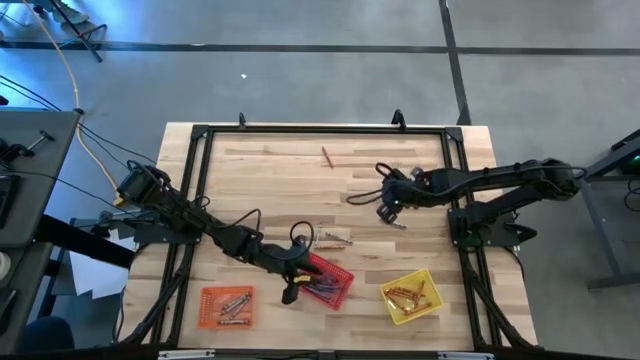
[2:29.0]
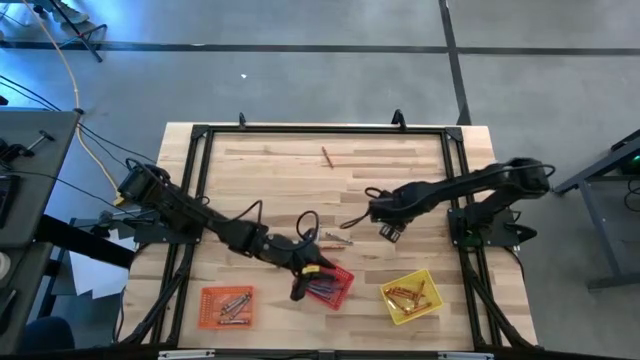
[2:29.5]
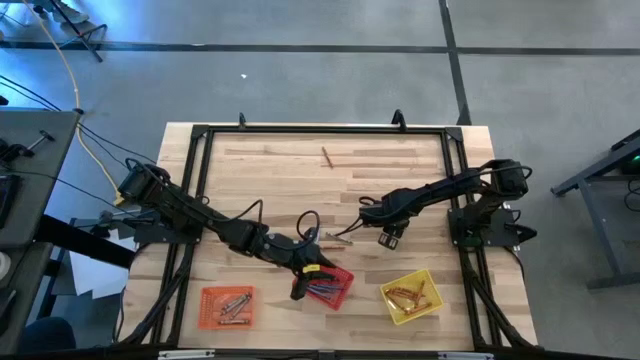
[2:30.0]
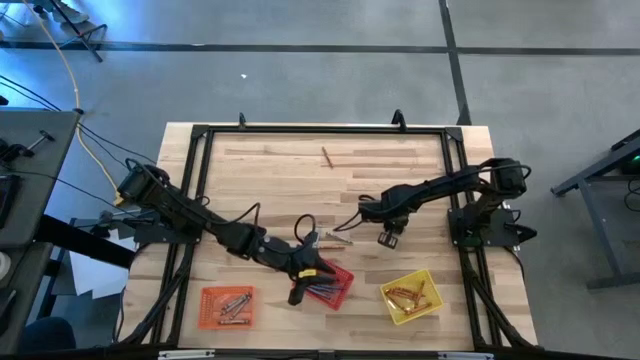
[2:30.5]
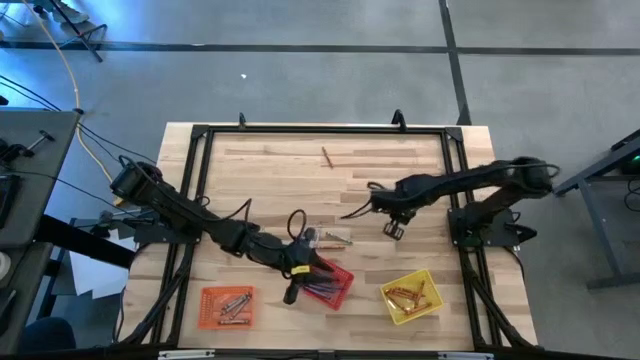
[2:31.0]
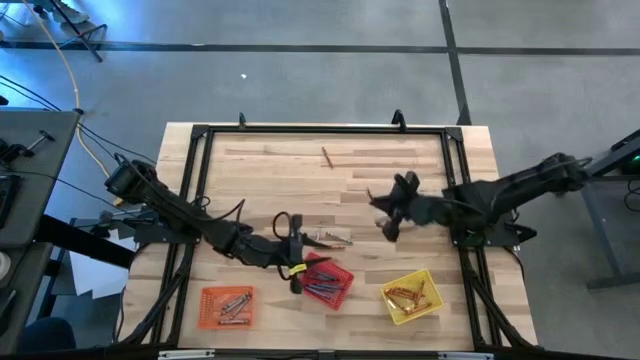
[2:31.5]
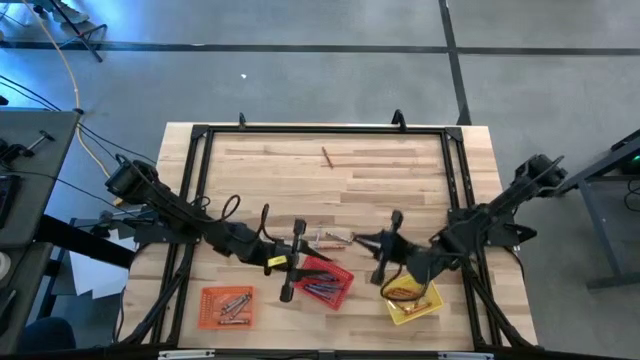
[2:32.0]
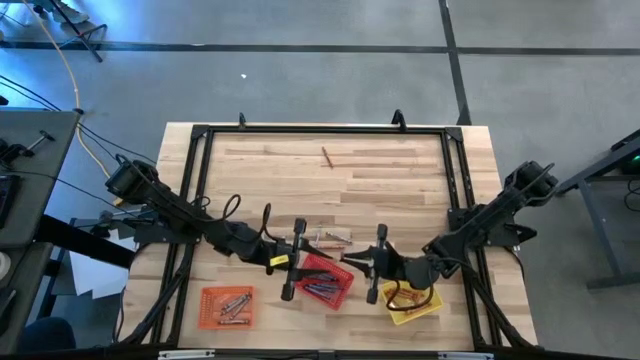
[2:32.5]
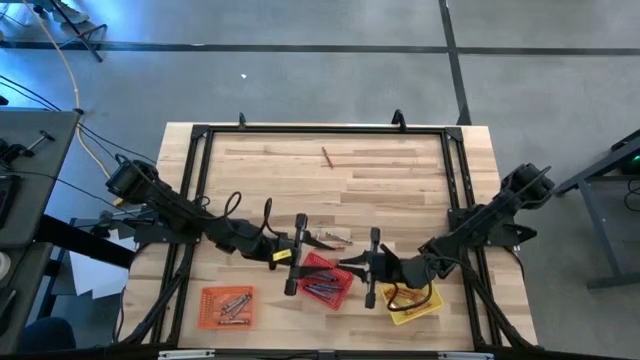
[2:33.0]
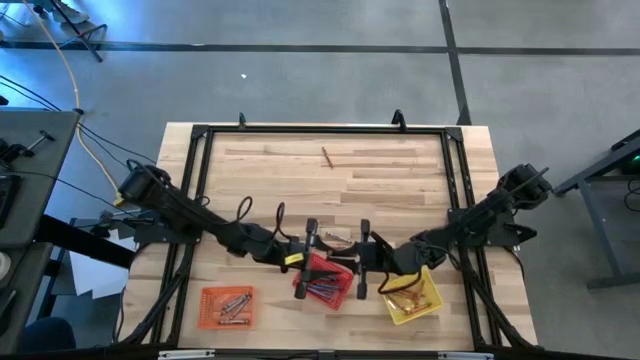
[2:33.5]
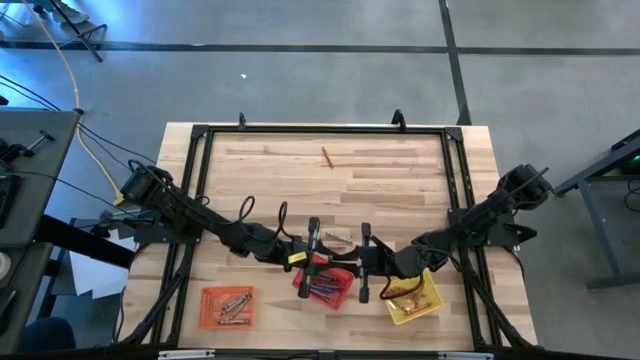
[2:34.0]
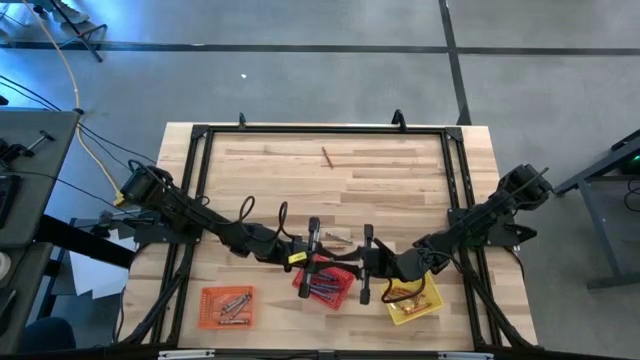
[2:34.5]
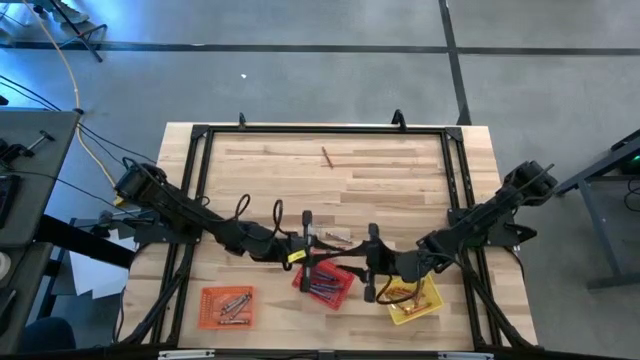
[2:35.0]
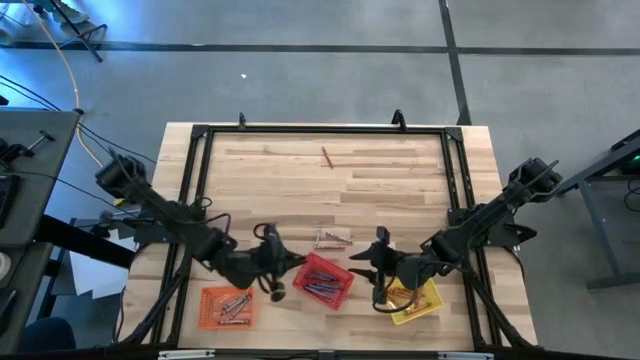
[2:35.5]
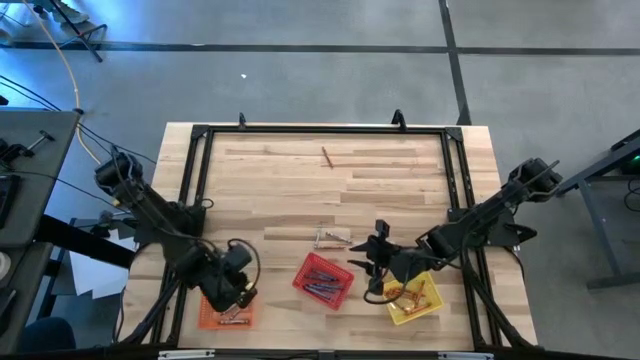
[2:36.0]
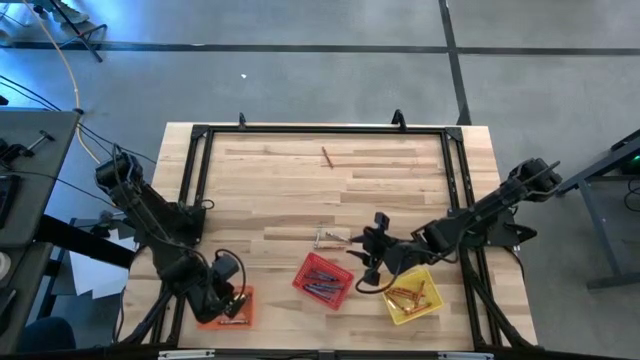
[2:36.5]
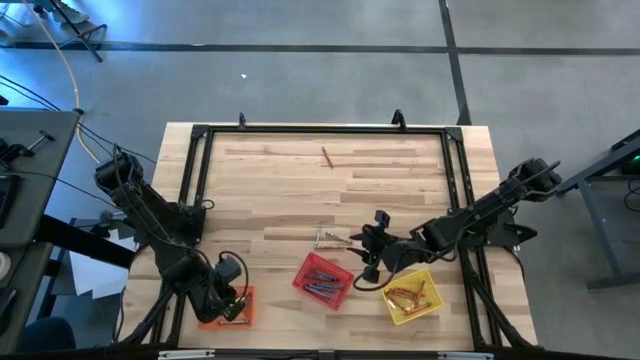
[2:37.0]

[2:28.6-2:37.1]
Task: Sort crayons
Put the gray crayon into the orange bin

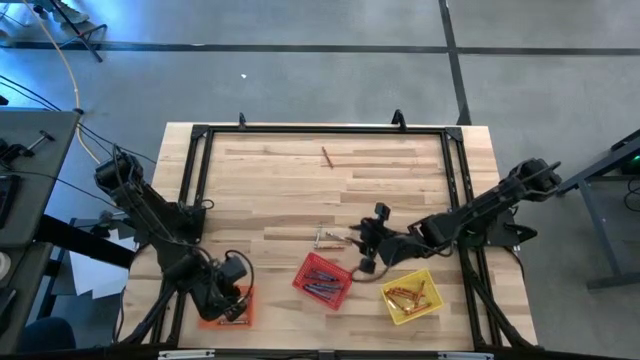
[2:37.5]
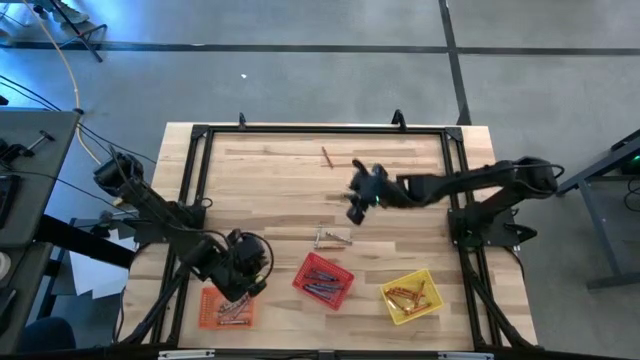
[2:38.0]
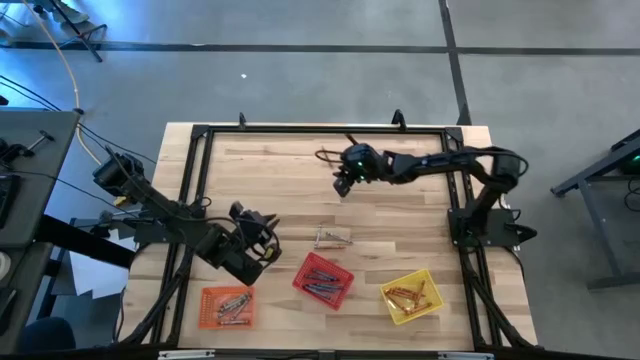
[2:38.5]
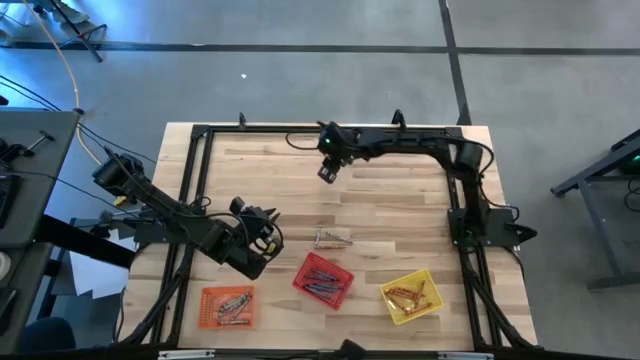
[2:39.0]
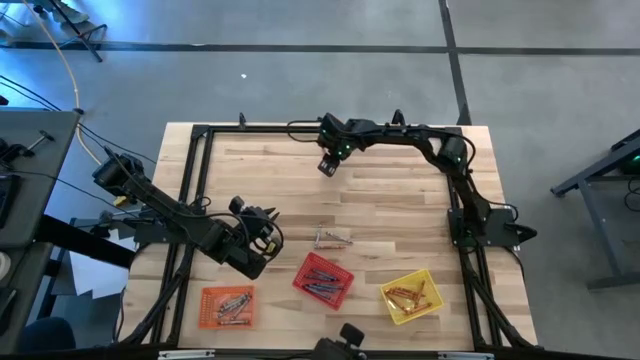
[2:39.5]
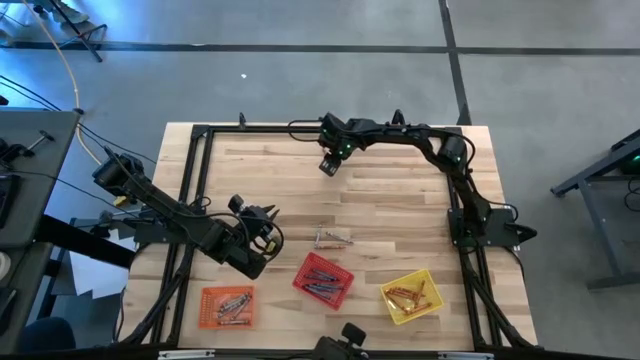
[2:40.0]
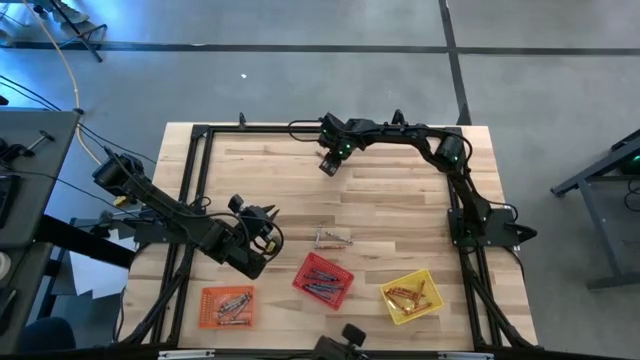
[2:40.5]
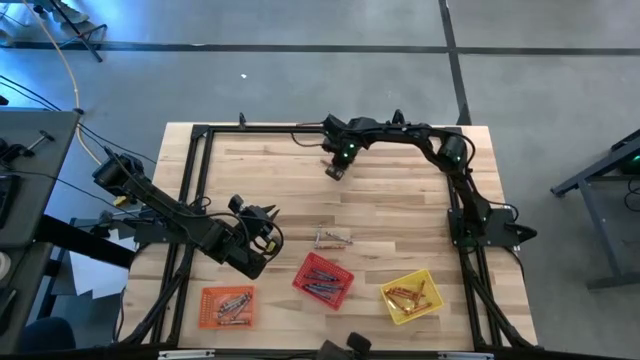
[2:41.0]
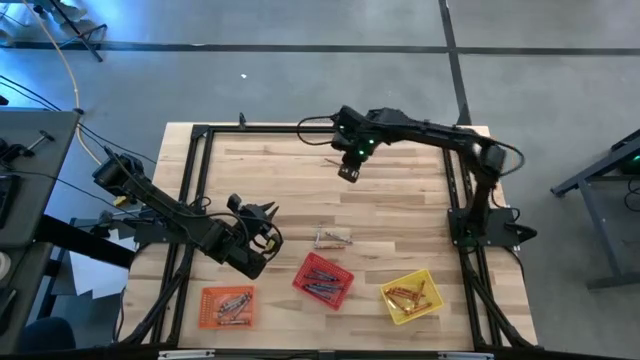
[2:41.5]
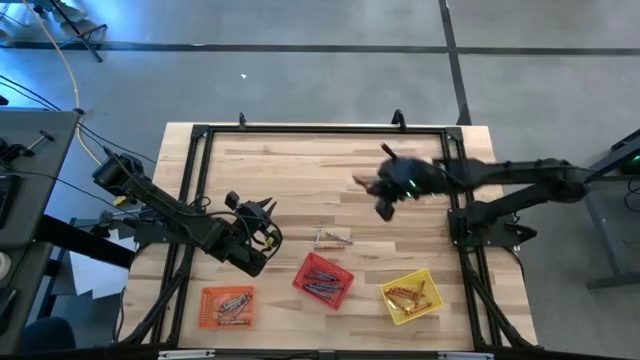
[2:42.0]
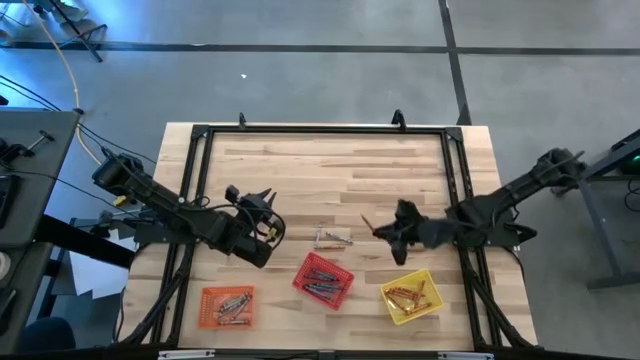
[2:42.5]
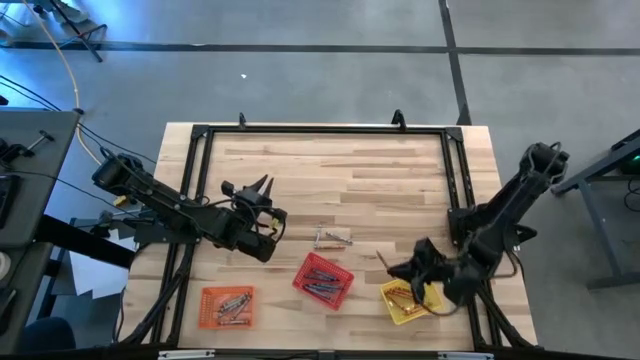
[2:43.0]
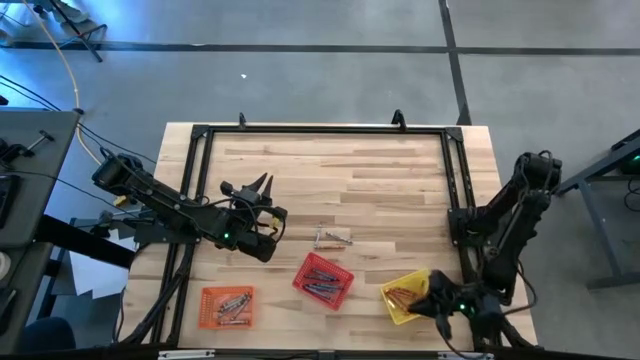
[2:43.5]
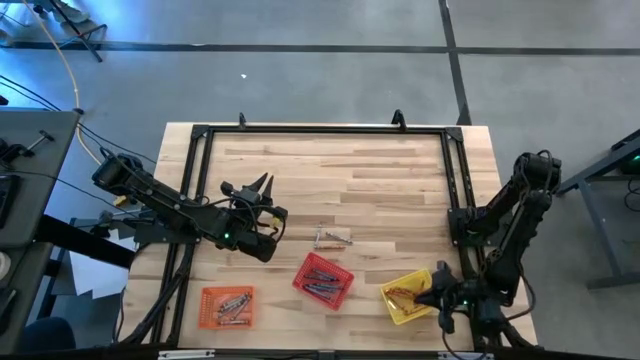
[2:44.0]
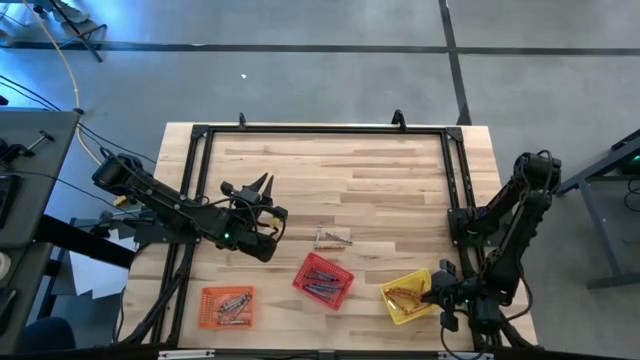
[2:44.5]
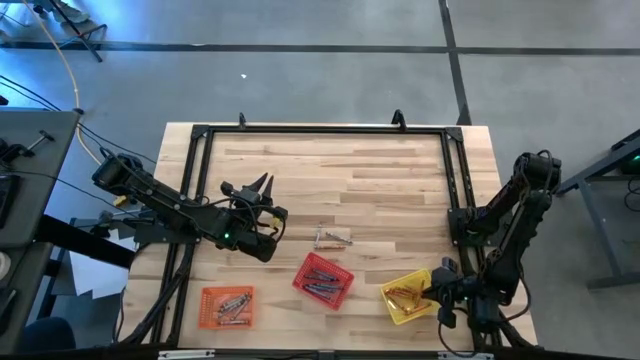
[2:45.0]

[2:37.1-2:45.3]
Put the orange crayon into the yellow bin
